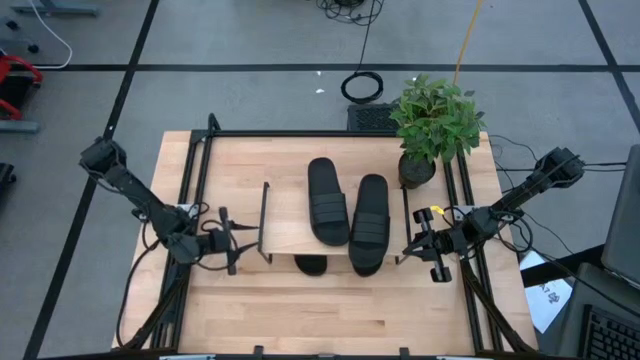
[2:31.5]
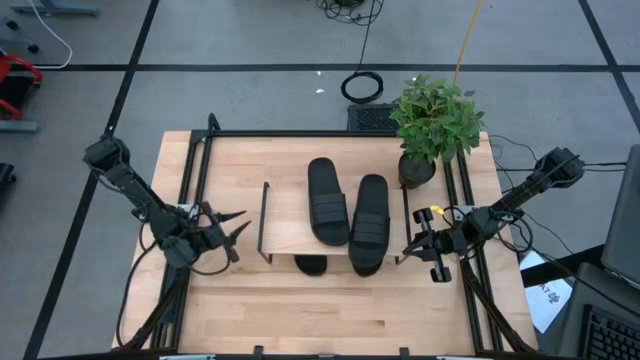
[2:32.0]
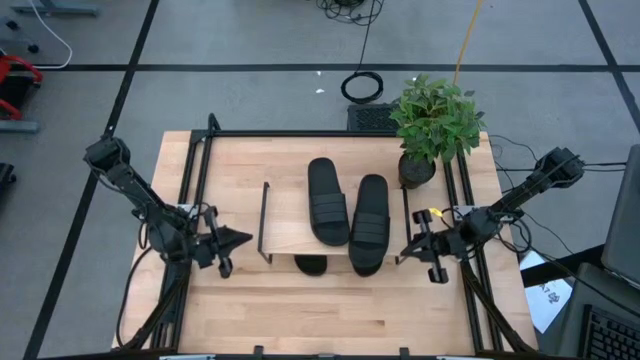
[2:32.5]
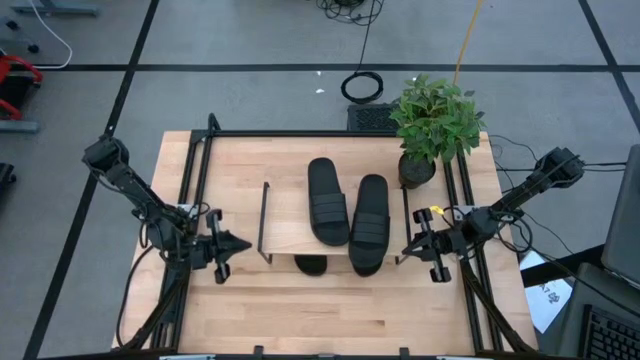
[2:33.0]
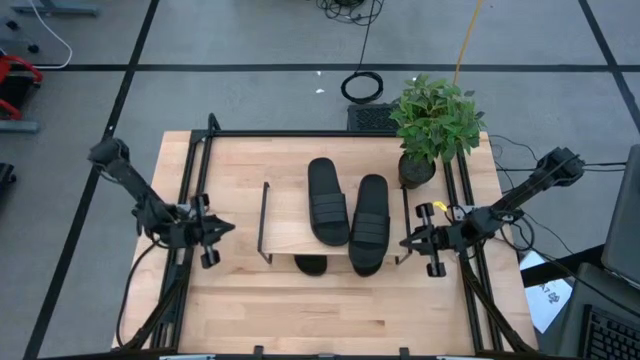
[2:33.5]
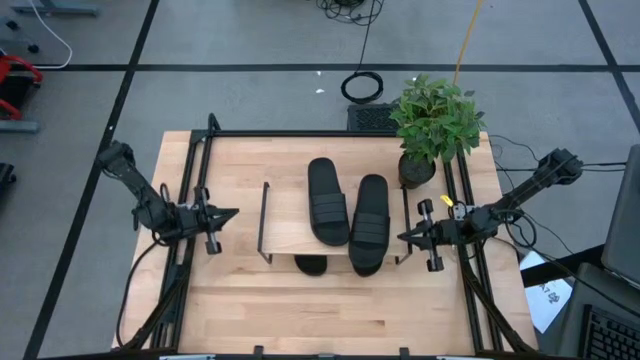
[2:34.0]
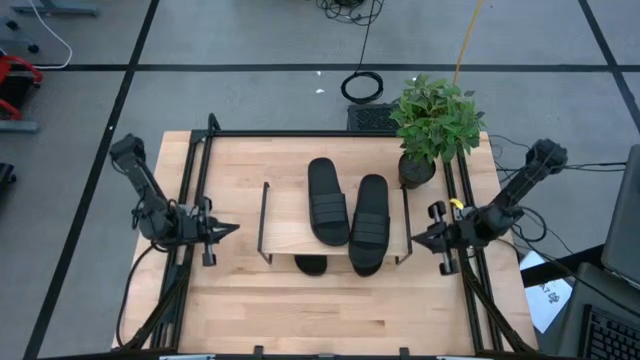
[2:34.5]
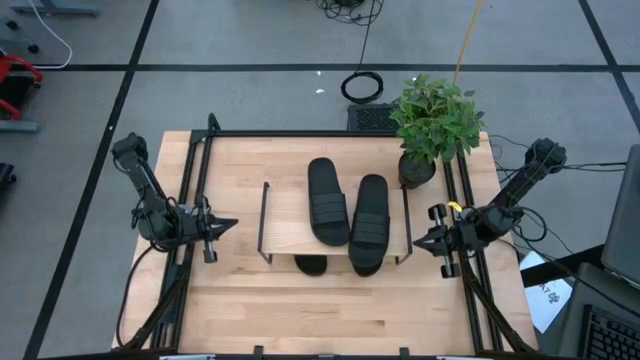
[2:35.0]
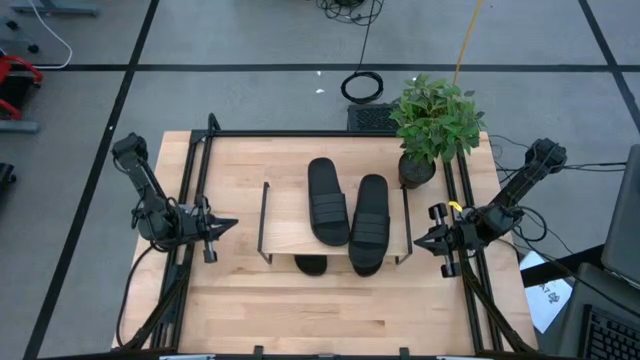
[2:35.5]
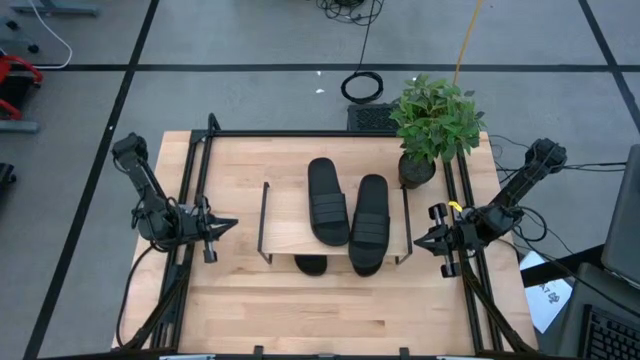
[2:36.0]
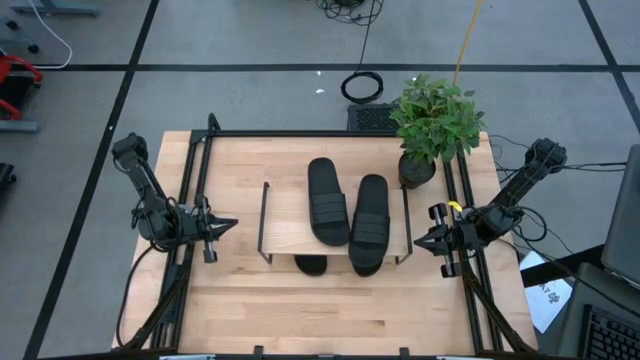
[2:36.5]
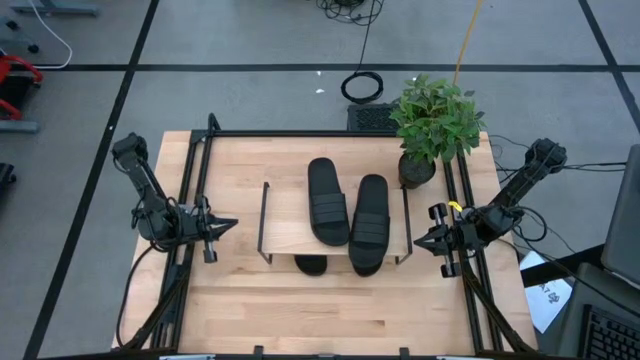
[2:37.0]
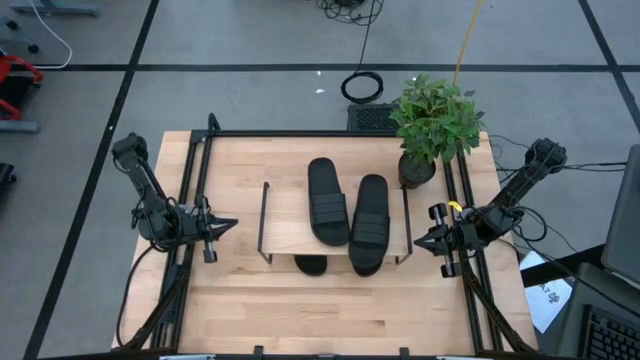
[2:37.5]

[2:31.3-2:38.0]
Task: Pick and place slides into the shelf
Return to Home Position

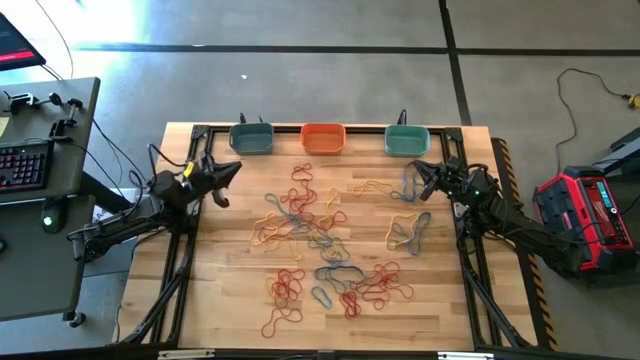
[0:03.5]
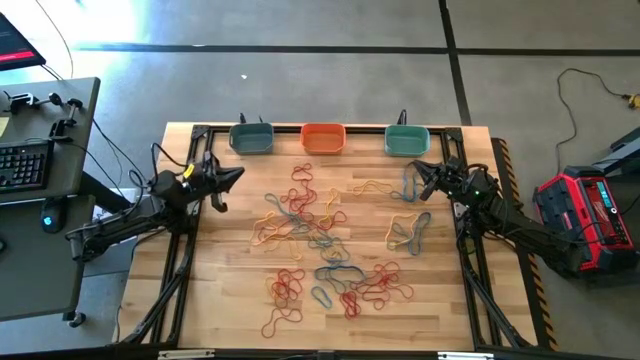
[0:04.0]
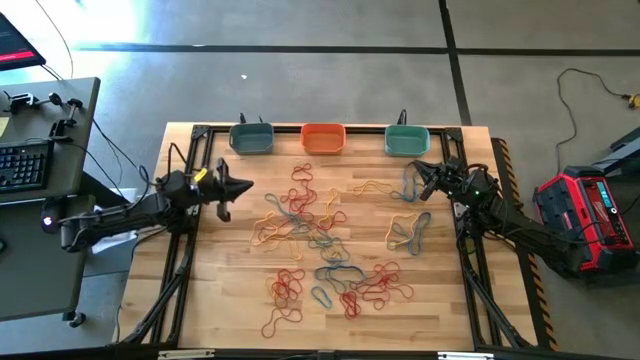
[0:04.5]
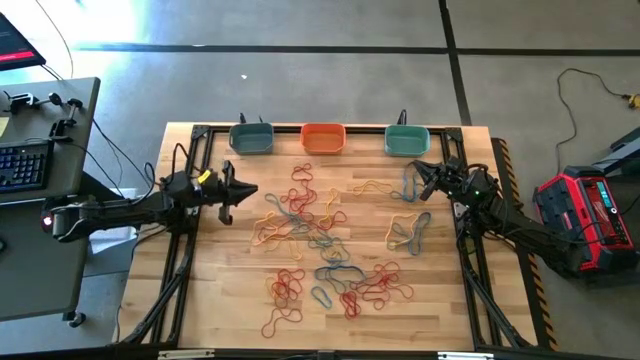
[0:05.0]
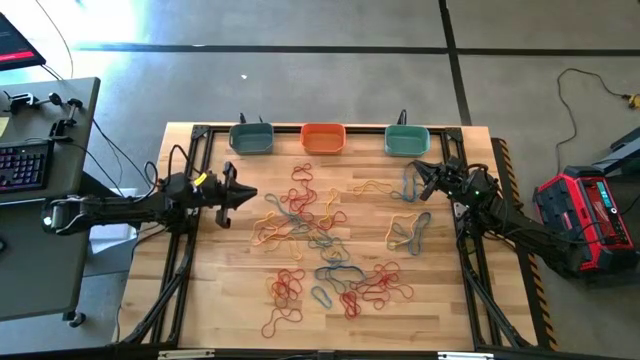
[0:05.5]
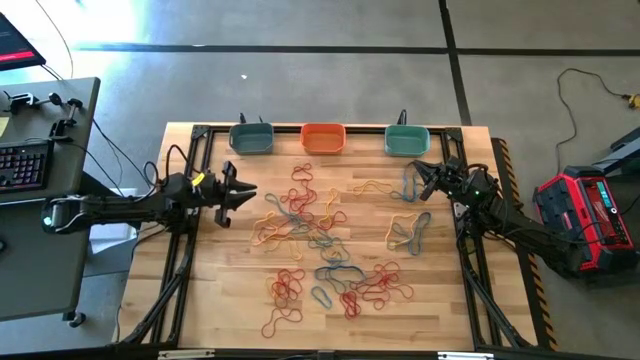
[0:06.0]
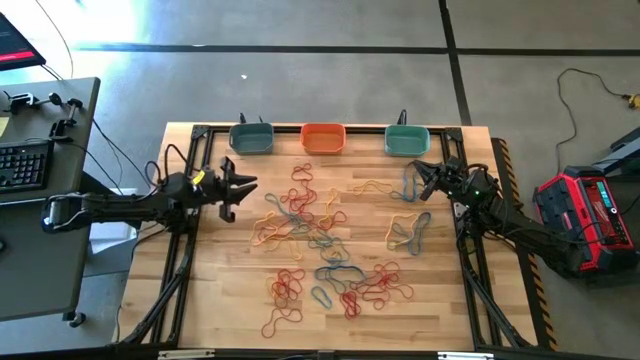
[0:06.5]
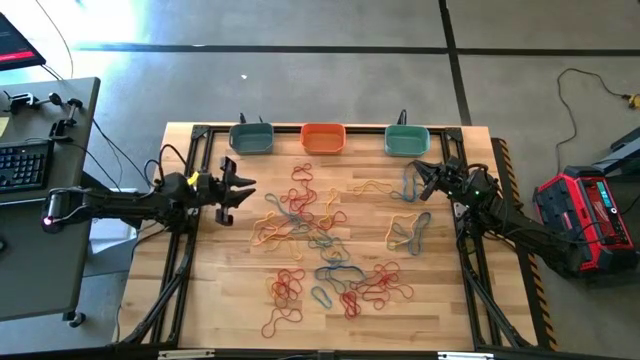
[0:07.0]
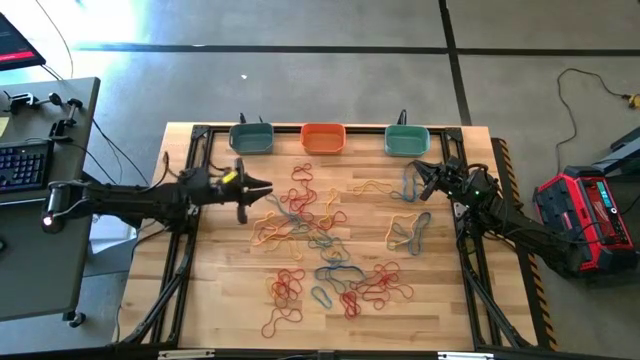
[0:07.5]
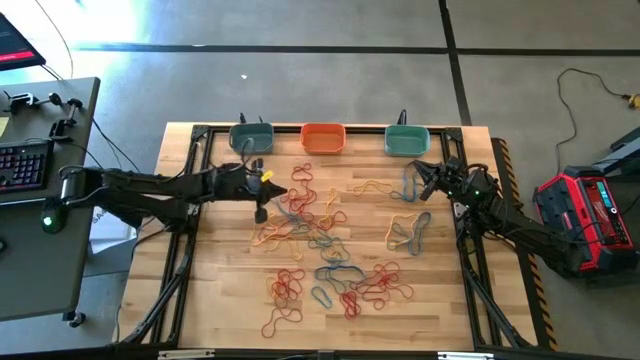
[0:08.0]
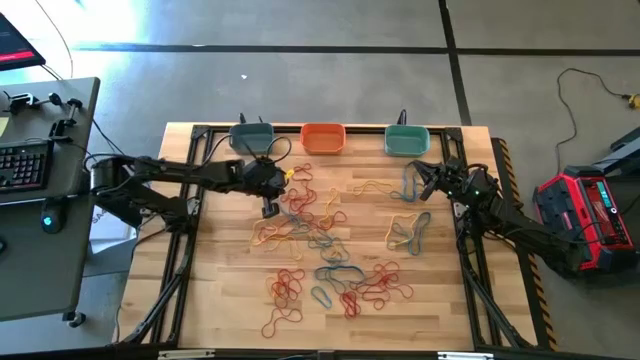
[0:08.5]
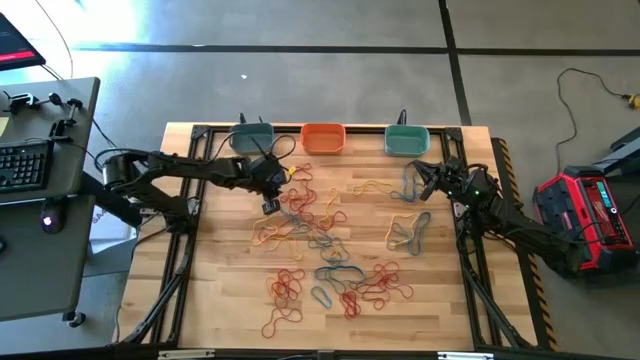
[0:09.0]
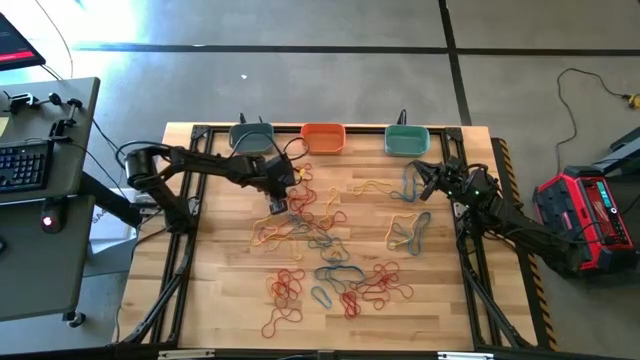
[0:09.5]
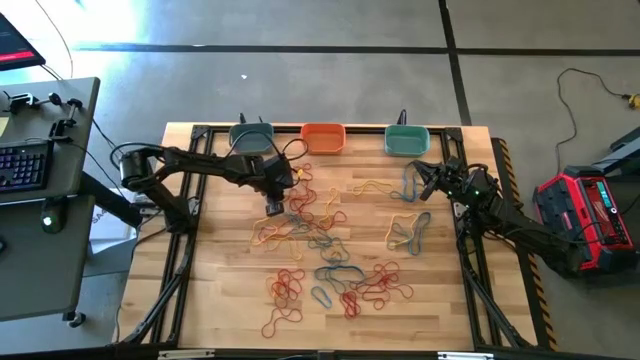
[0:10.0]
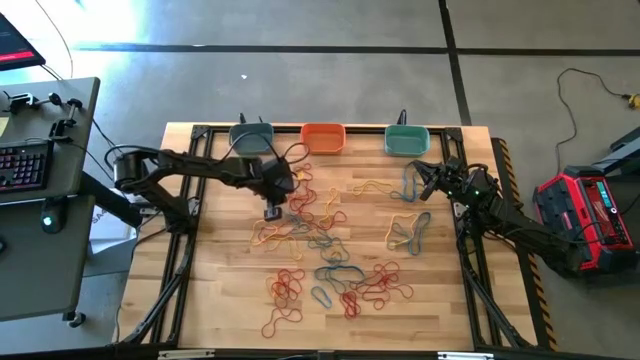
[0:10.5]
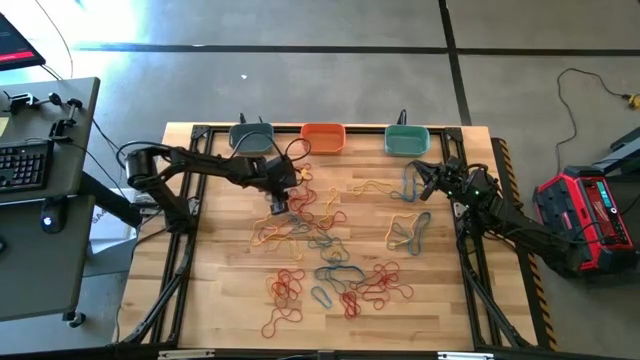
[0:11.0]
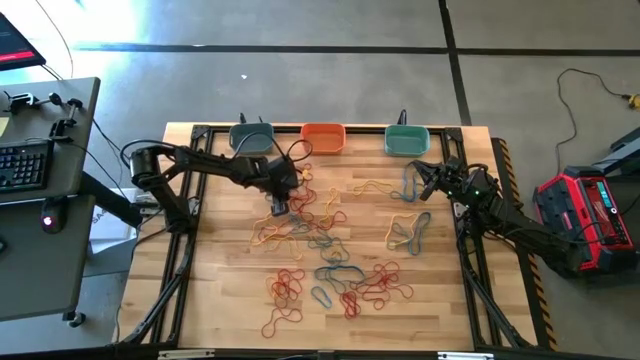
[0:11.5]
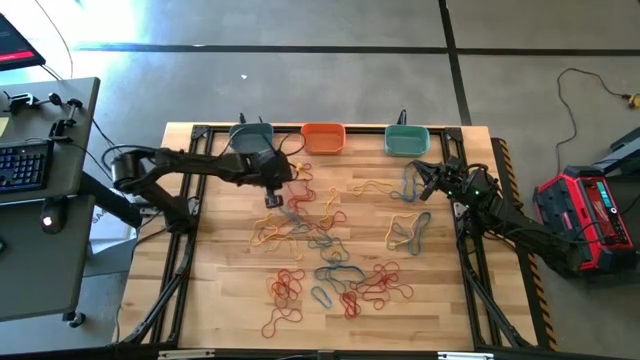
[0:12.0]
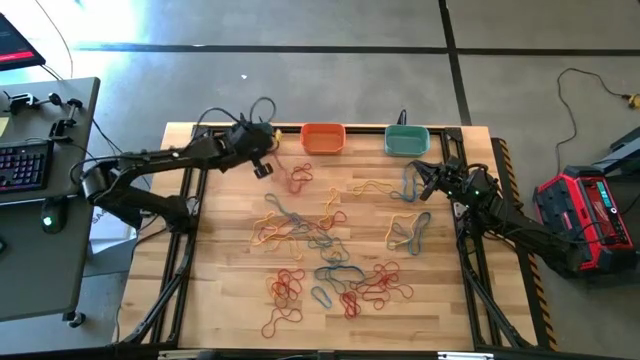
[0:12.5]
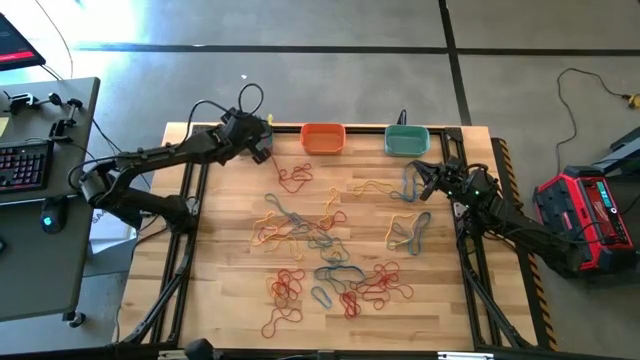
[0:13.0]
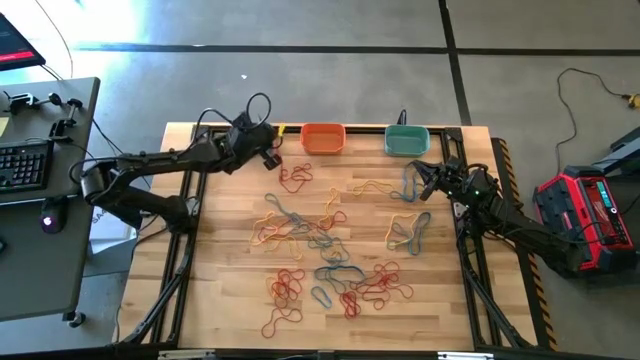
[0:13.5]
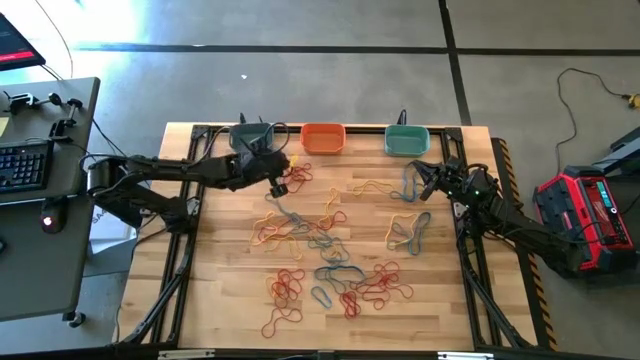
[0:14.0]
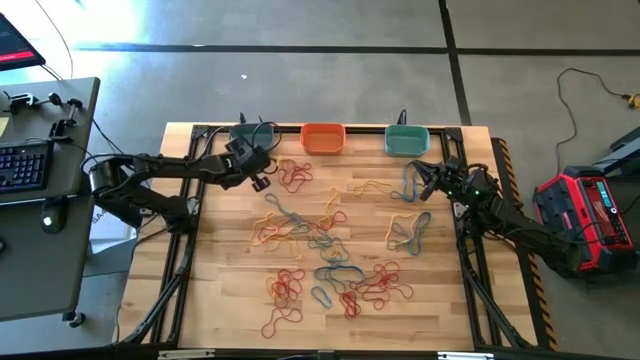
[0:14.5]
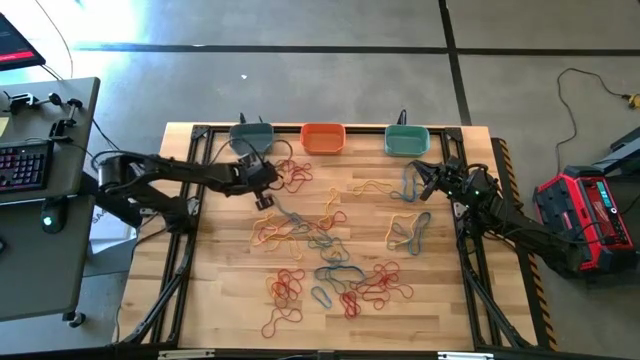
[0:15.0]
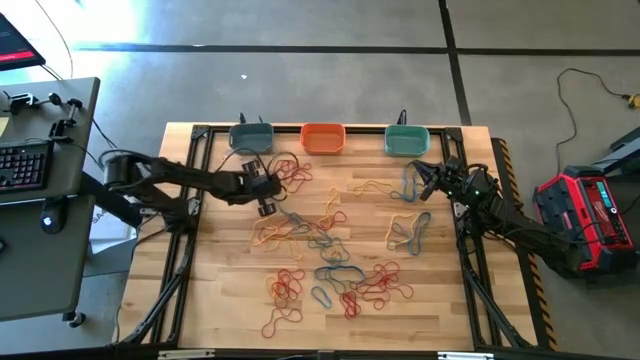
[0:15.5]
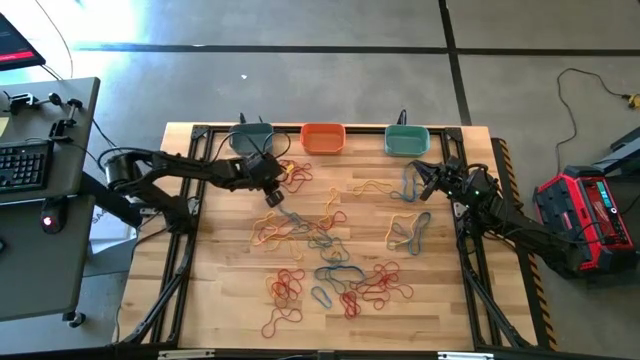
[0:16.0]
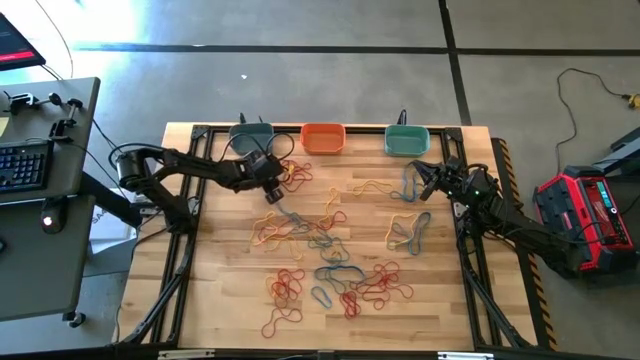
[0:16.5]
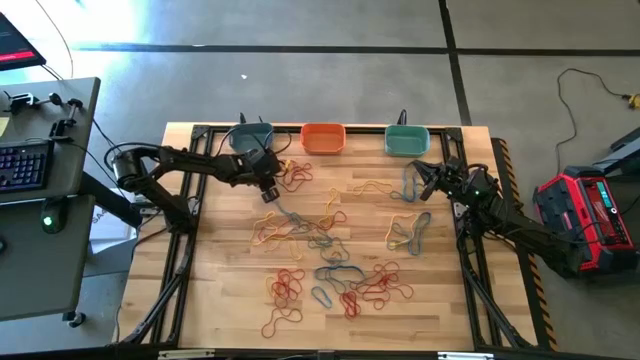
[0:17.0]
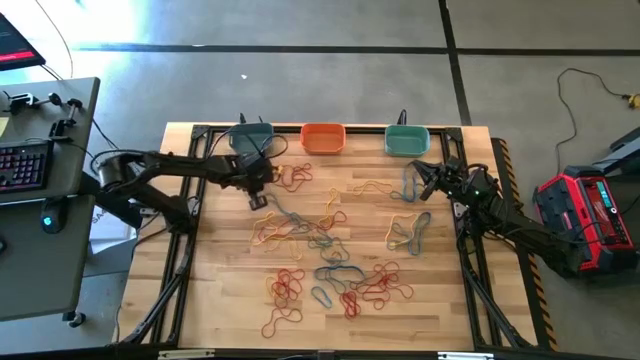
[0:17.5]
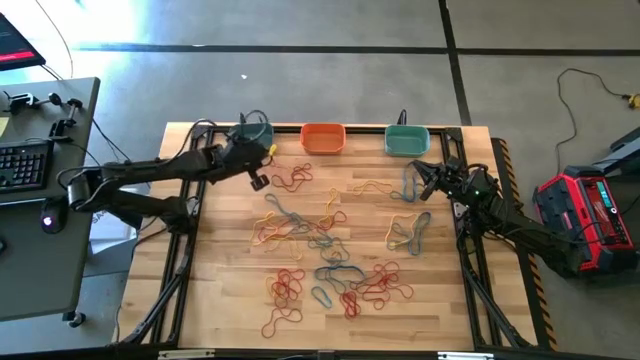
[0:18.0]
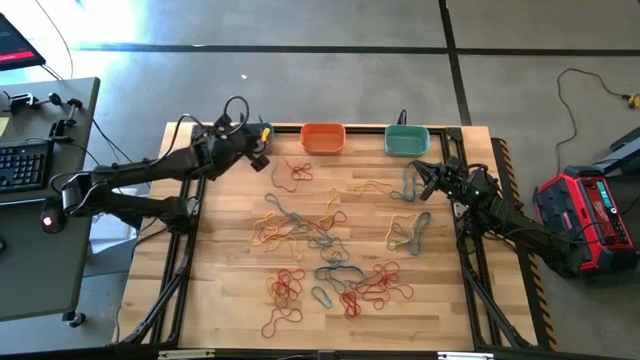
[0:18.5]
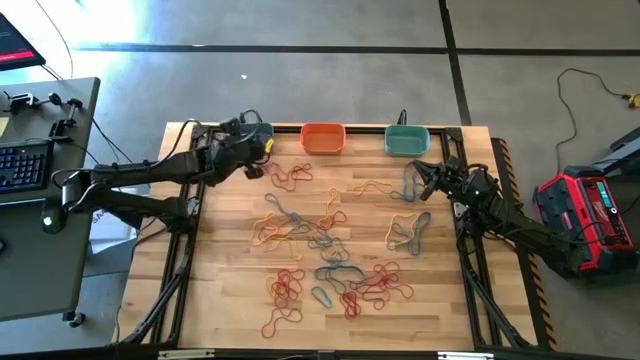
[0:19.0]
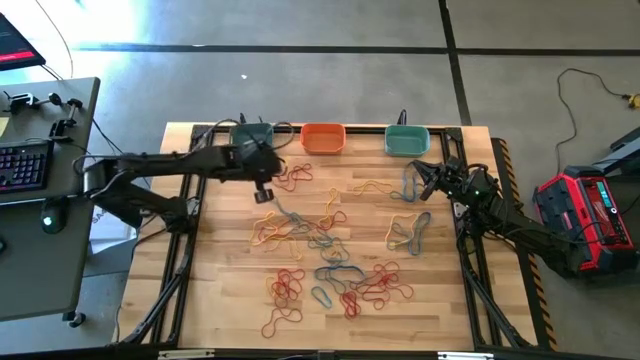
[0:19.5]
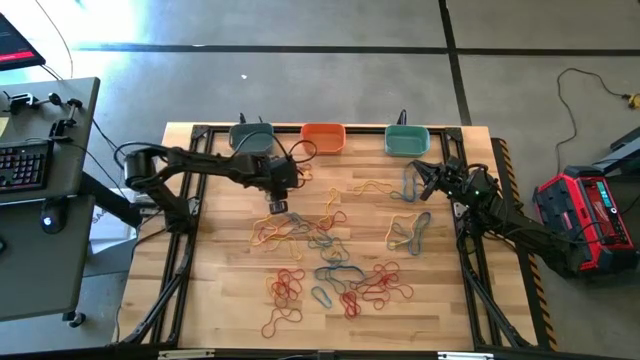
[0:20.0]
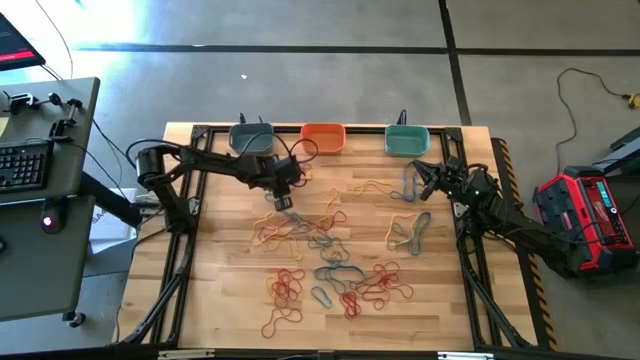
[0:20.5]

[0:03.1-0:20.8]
Task: Sort rubber bands into baskets
Put the red rubber band into the blue bin
